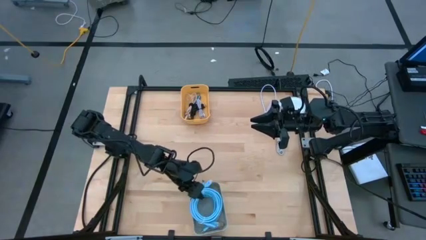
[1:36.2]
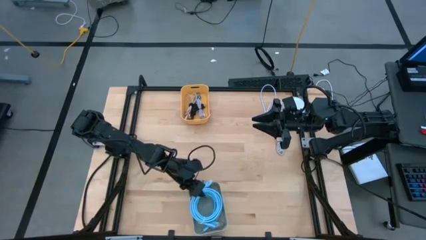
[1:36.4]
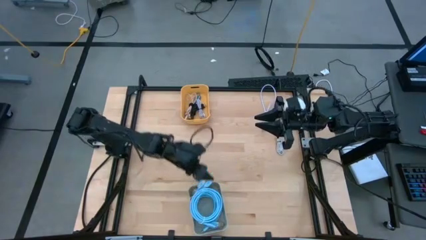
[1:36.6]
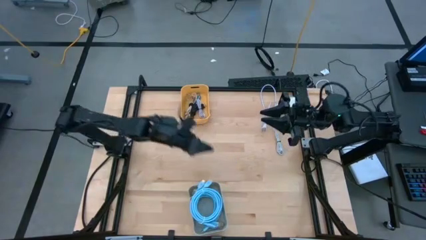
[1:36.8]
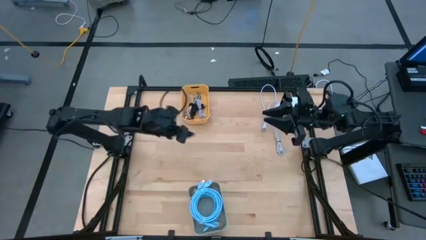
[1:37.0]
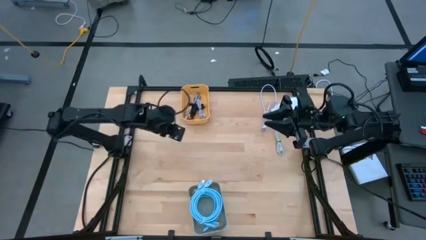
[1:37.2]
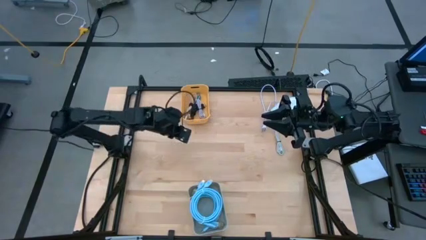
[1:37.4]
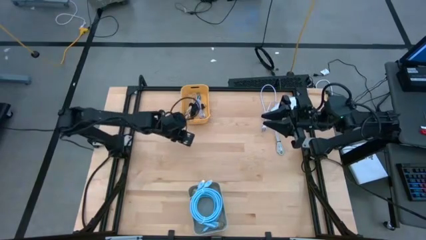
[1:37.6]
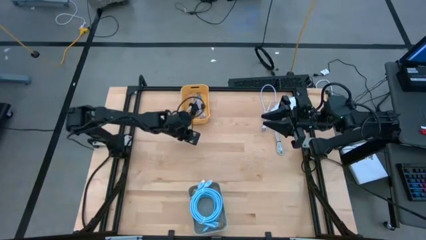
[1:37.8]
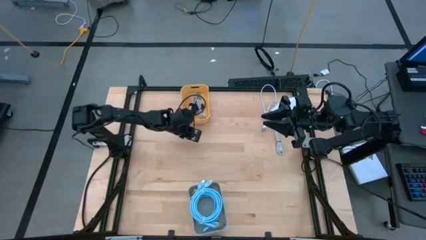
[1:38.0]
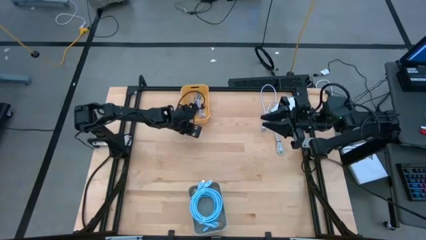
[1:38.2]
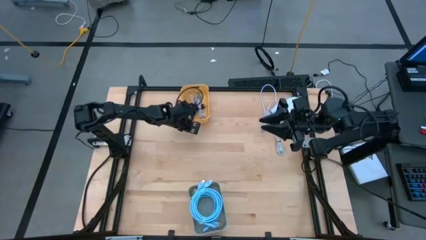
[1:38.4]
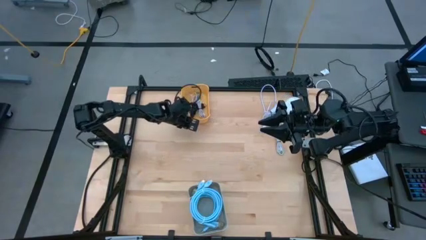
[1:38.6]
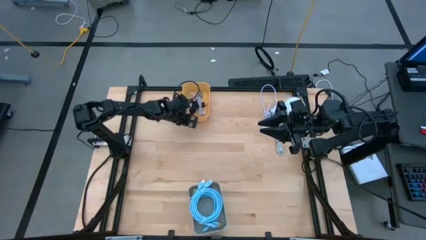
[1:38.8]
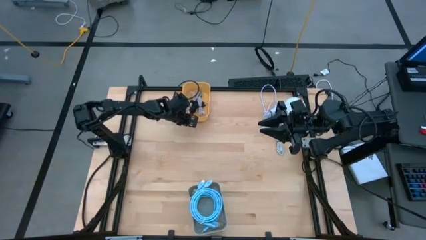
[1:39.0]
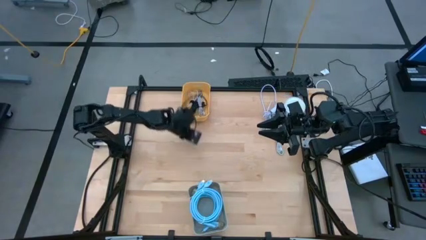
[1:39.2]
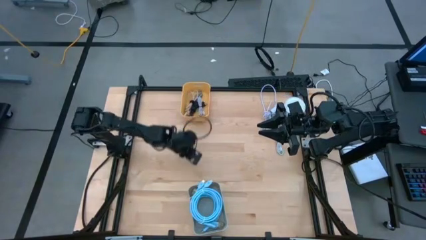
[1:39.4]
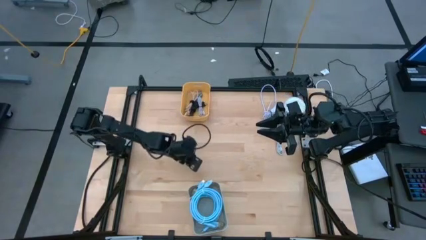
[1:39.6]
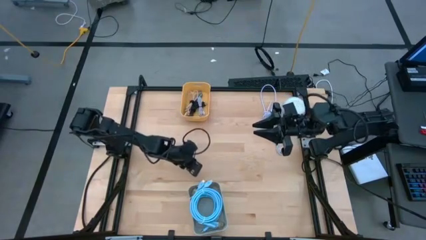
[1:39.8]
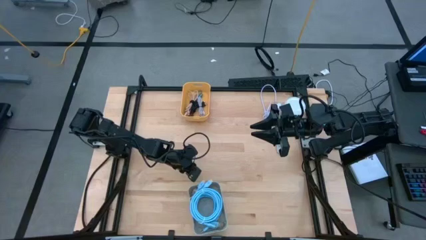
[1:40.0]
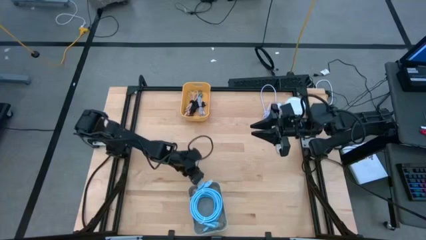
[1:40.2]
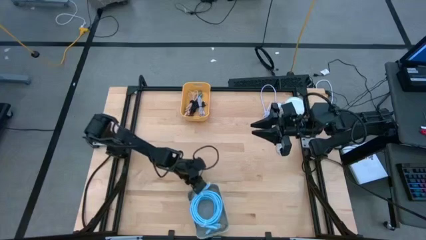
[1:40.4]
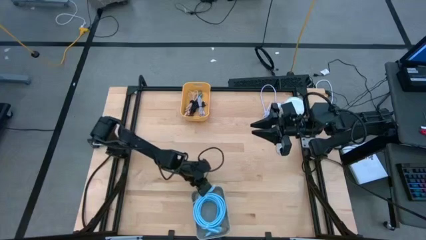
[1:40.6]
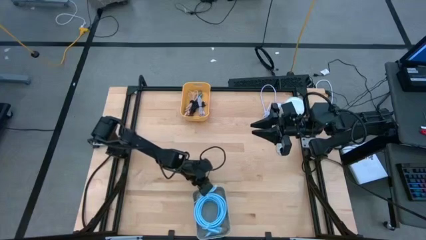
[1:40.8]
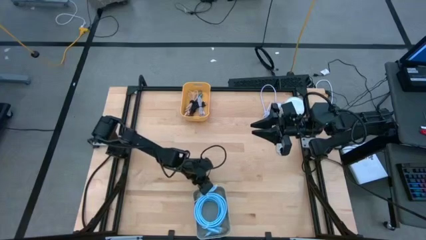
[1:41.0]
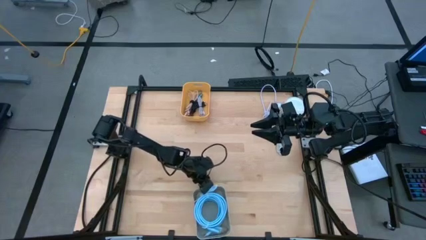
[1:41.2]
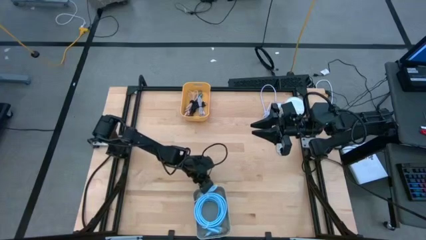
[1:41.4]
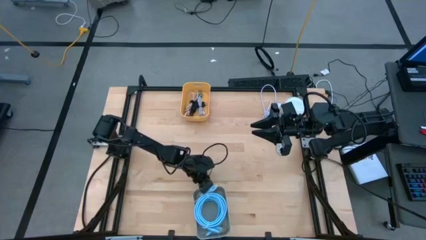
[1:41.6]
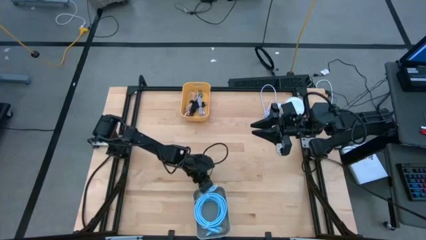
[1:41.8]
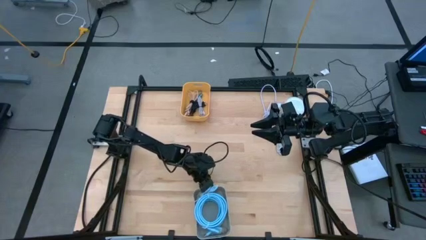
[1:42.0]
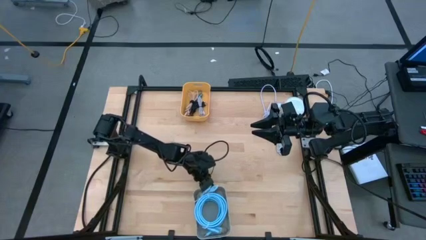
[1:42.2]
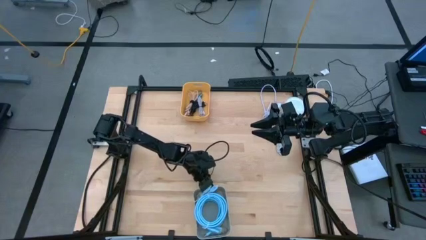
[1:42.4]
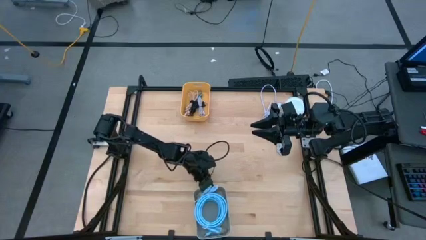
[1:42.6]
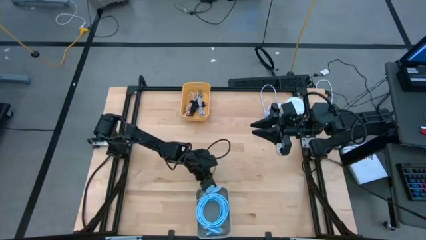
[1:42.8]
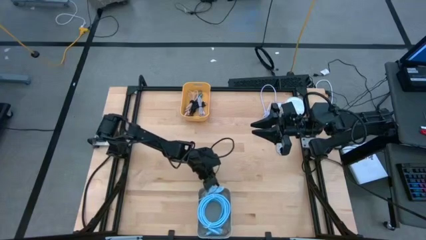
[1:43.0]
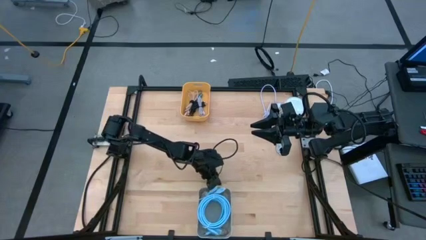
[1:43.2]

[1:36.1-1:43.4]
Task: Pick & Place USB Port
Adjust the bins

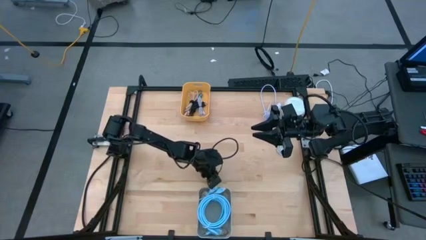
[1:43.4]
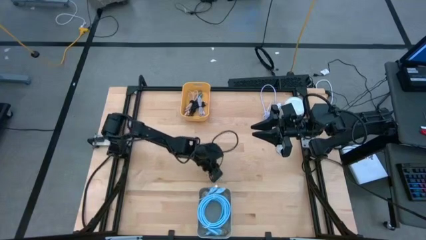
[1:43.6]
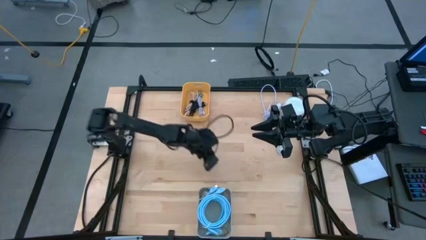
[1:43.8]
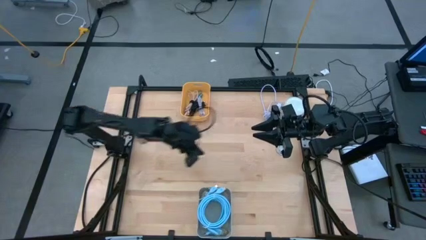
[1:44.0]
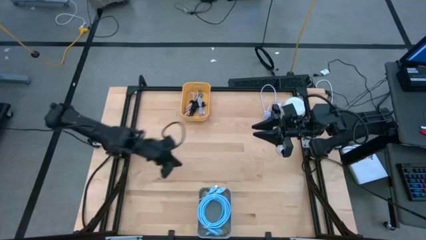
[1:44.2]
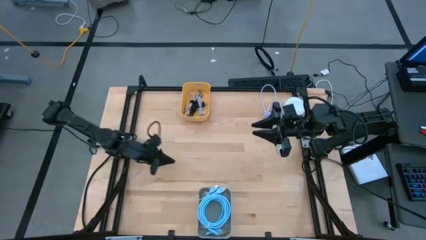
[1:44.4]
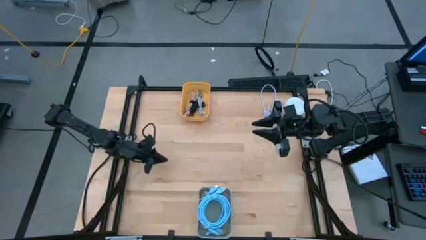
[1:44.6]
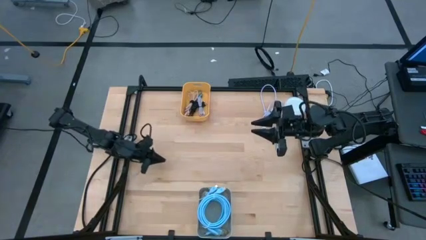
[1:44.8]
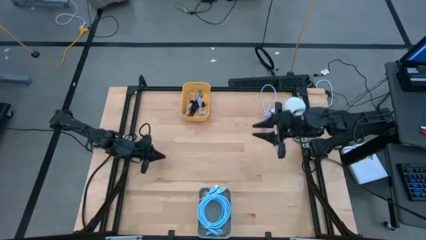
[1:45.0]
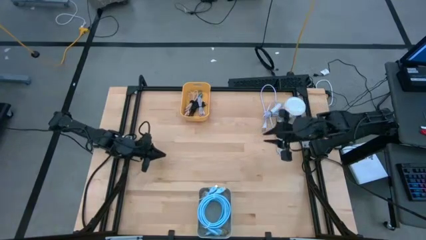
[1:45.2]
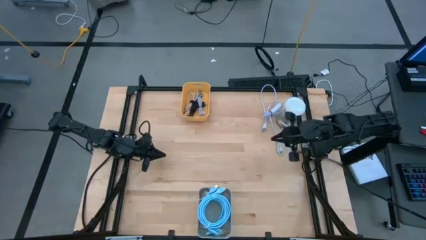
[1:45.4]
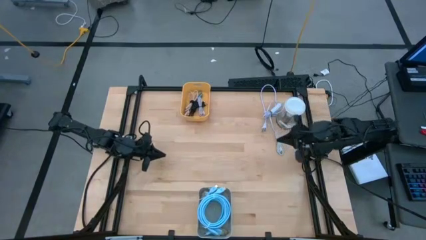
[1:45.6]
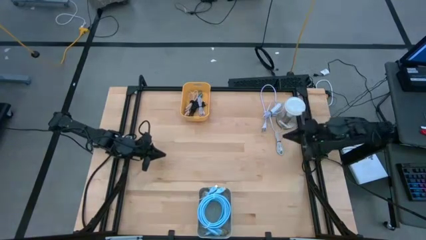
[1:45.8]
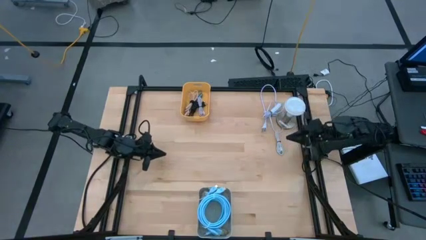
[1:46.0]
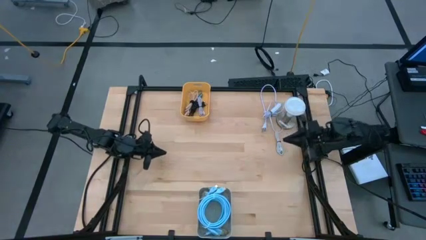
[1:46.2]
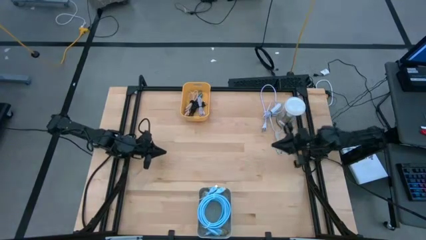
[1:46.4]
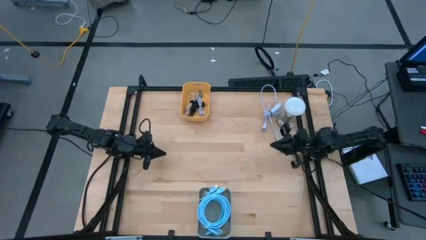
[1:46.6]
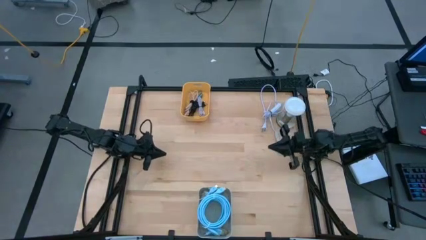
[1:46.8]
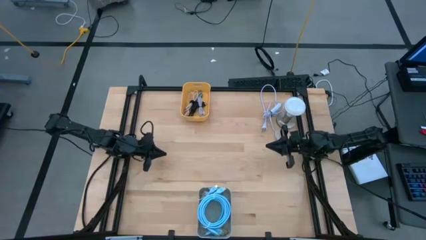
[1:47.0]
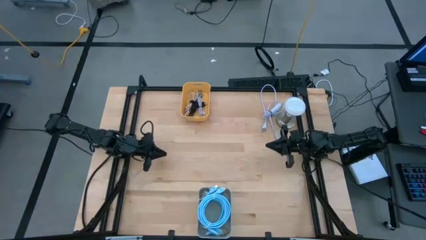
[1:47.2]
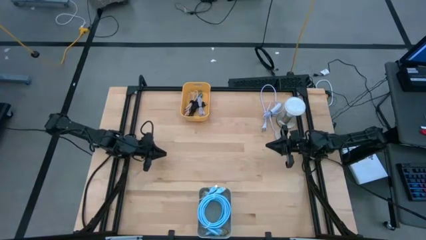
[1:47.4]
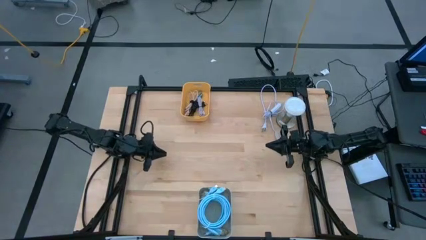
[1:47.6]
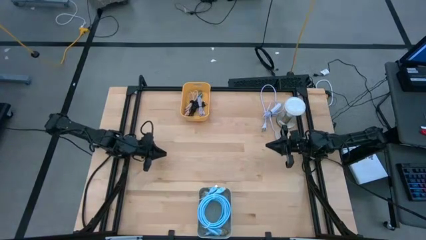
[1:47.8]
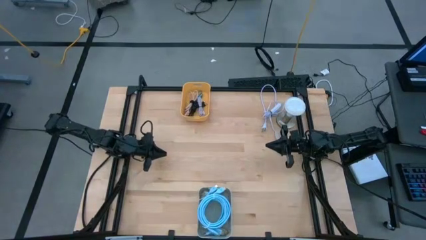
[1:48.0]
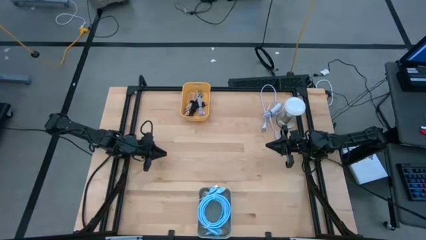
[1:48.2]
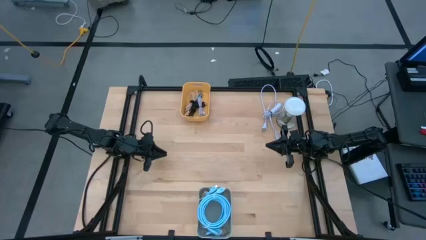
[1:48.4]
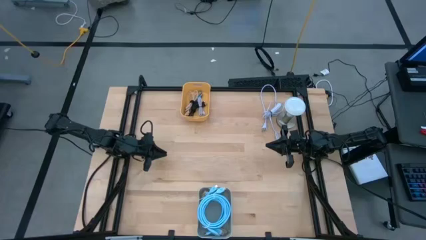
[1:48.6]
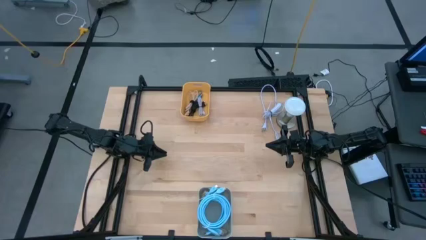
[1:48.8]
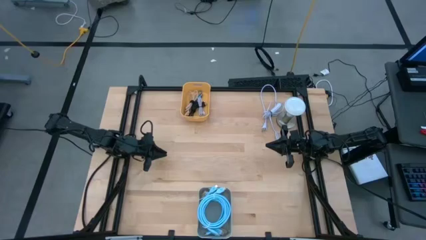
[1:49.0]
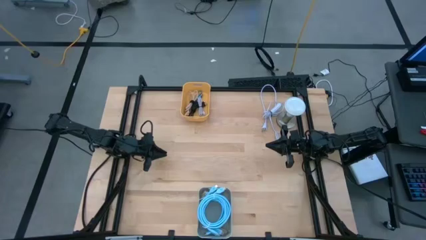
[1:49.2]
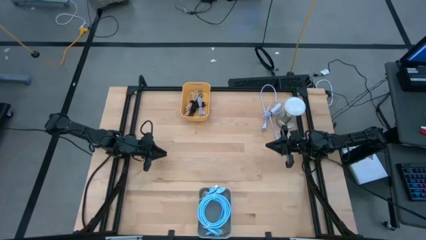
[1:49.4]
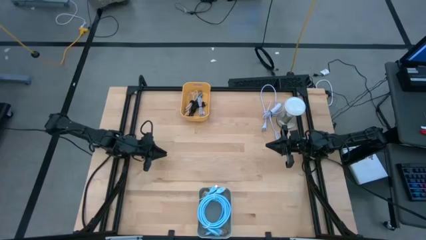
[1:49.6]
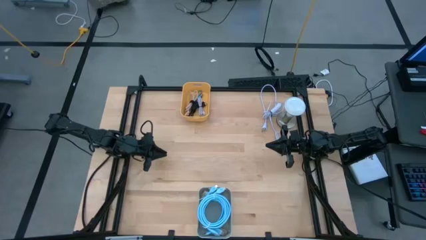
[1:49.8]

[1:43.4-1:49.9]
Return to Home Position

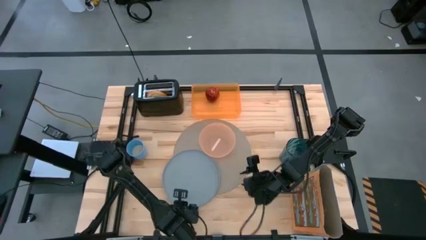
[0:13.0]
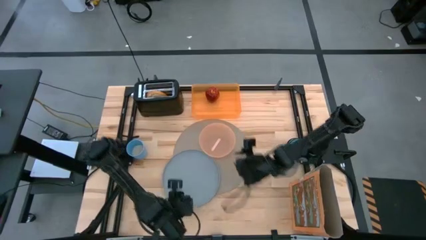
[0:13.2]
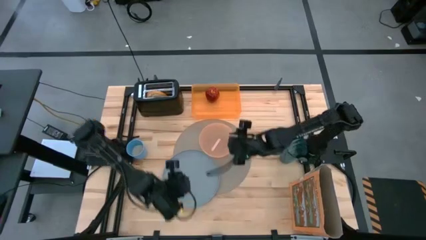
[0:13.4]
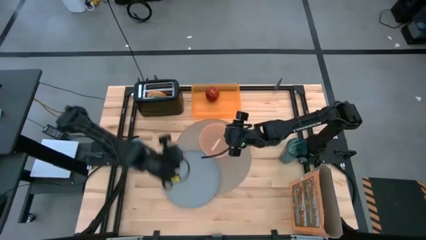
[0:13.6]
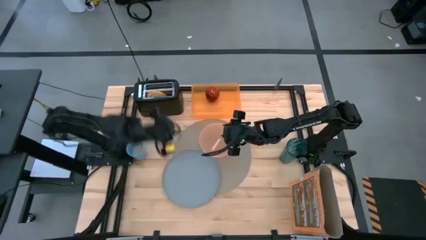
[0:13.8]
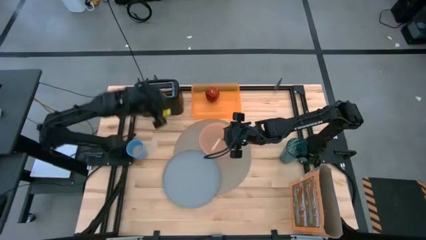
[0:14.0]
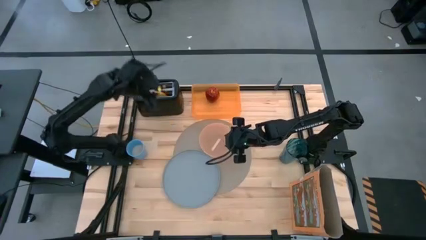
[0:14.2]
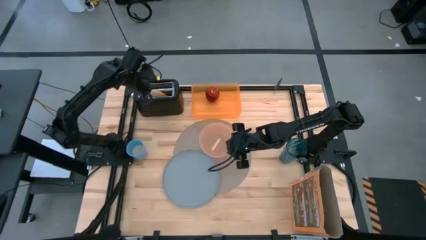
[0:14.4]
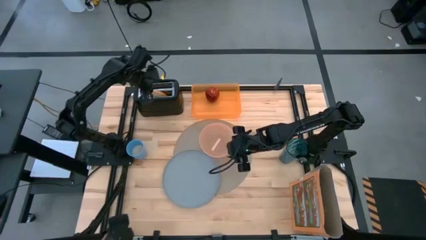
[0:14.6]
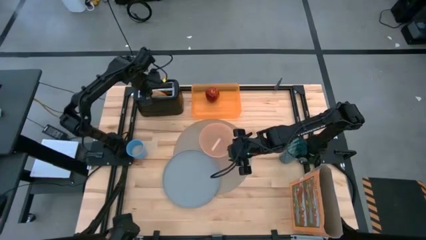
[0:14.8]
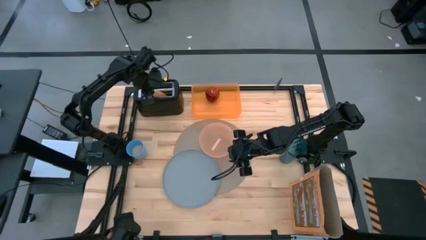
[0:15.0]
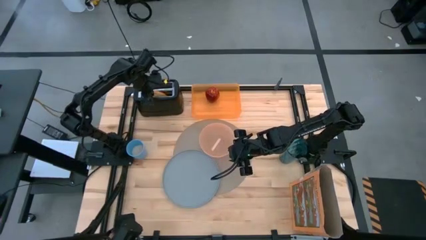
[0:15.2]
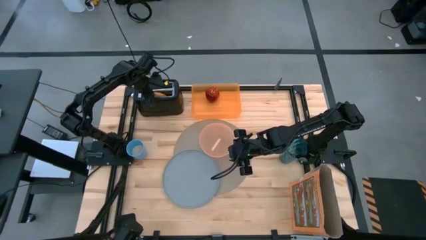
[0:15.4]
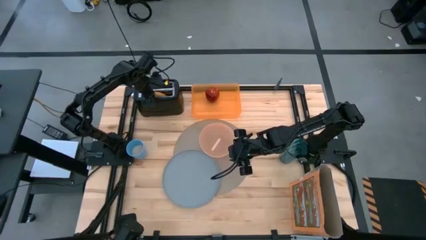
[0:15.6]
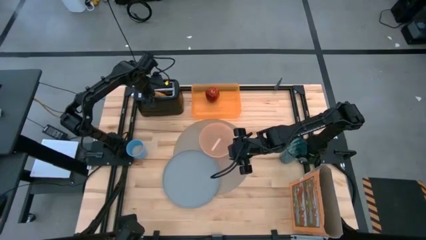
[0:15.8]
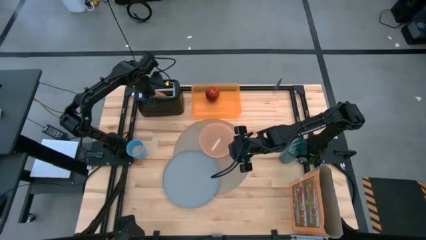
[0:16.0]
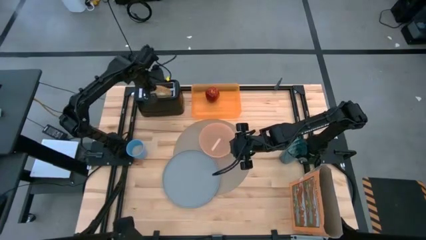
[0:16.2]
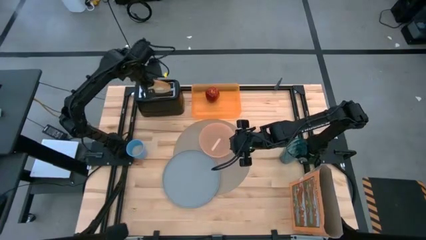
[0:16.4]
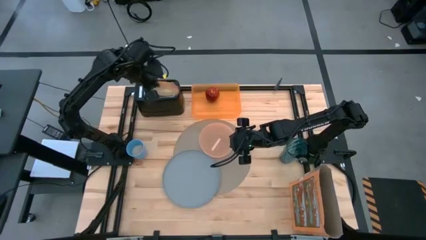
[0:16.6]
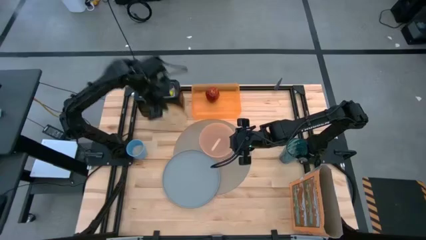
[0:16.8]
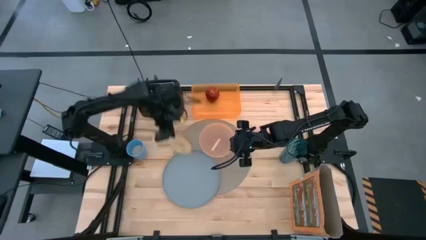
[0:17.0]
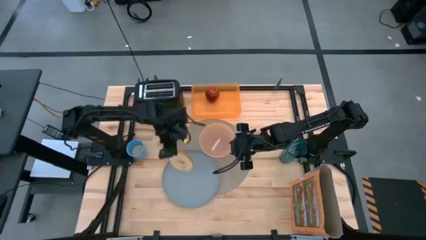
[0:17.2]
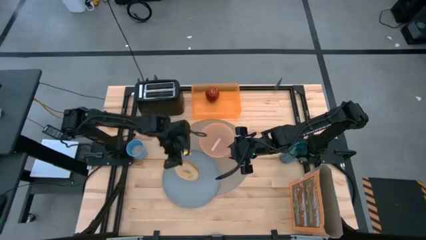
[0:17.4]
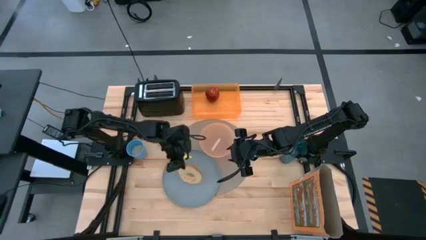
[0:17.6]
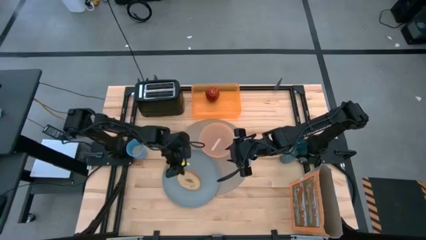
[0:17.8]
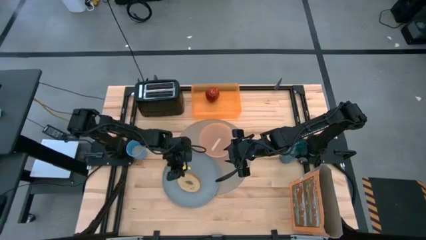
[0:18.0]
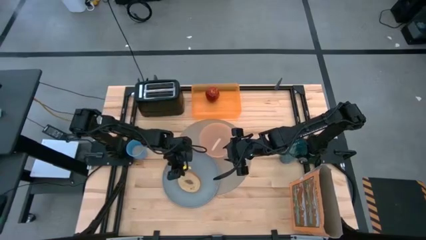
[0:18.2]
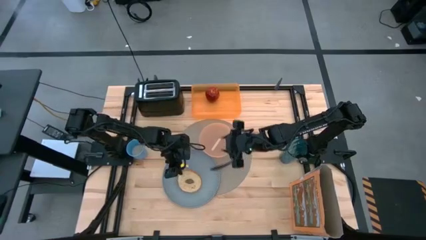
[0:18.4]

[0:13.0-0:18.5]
Task: Arrange a breakfast setting
Put the brown toasted bread on the light blue plate
